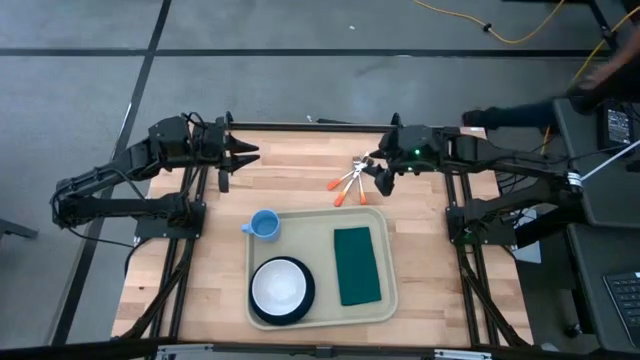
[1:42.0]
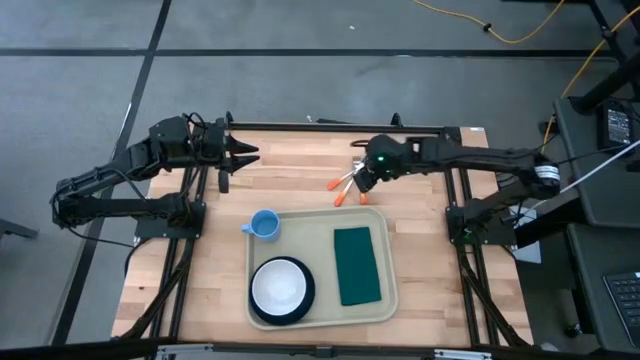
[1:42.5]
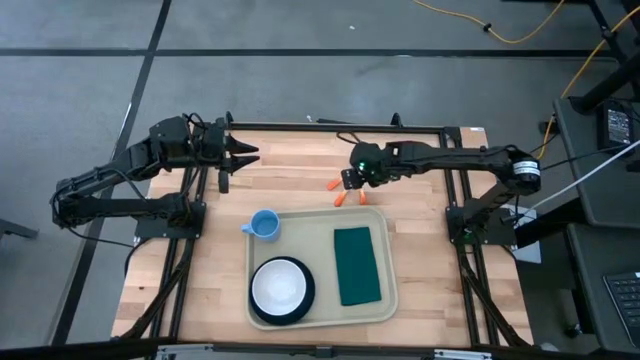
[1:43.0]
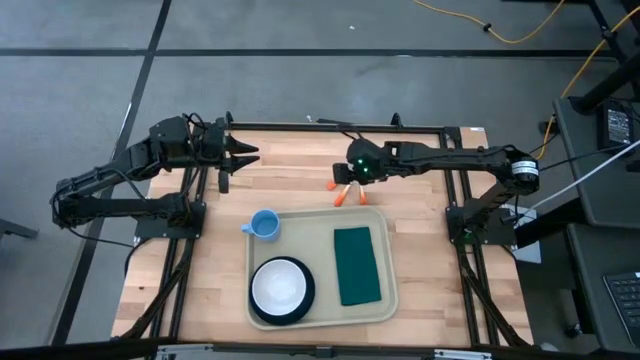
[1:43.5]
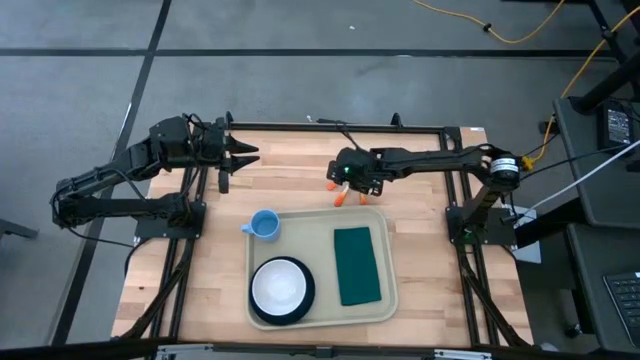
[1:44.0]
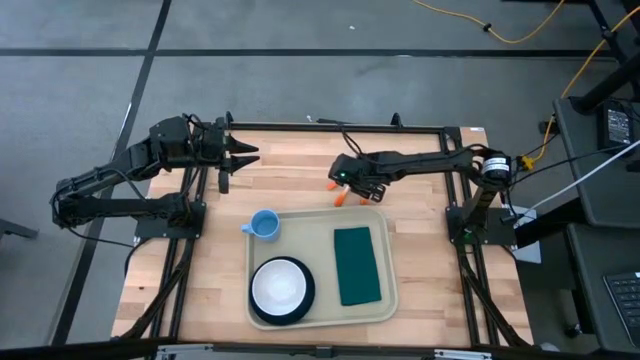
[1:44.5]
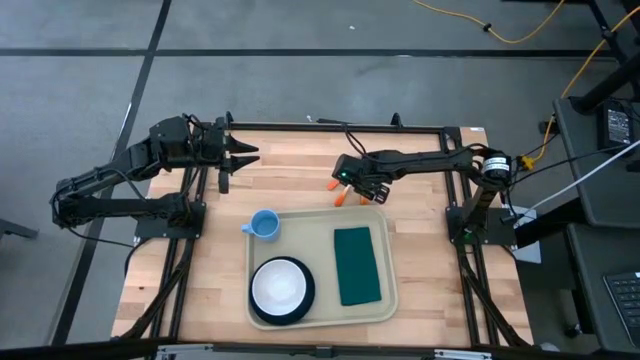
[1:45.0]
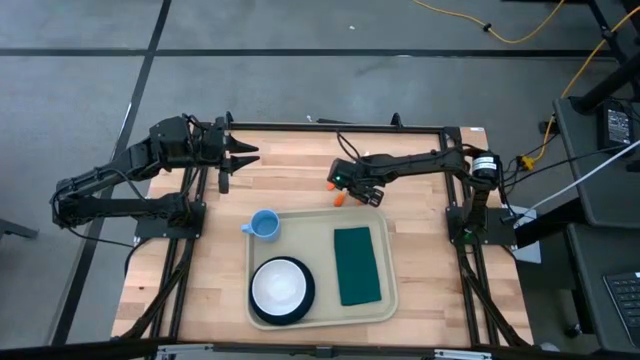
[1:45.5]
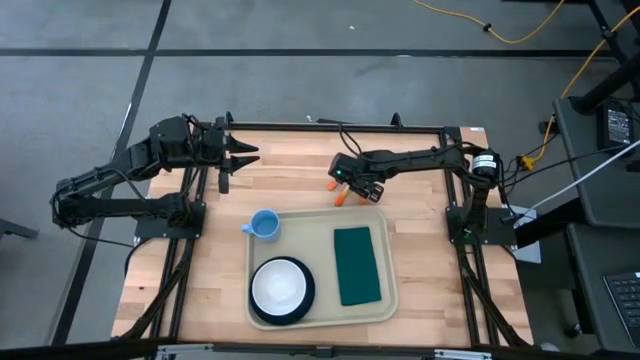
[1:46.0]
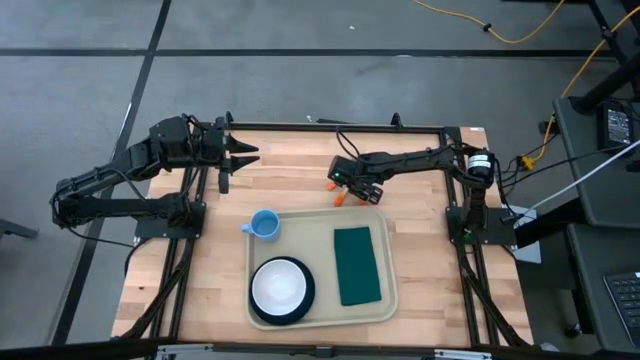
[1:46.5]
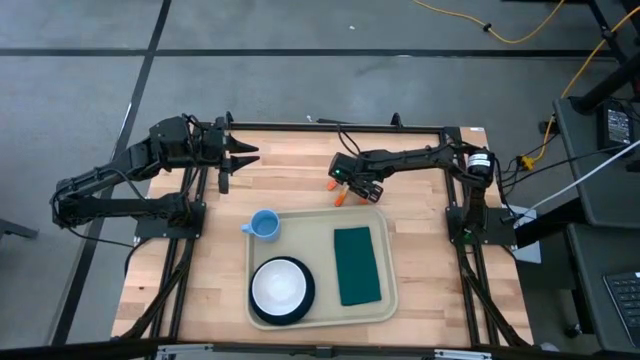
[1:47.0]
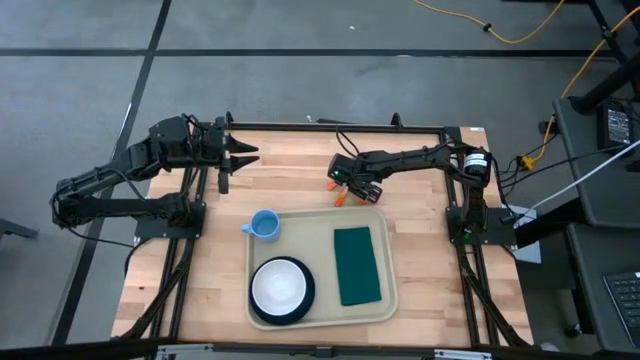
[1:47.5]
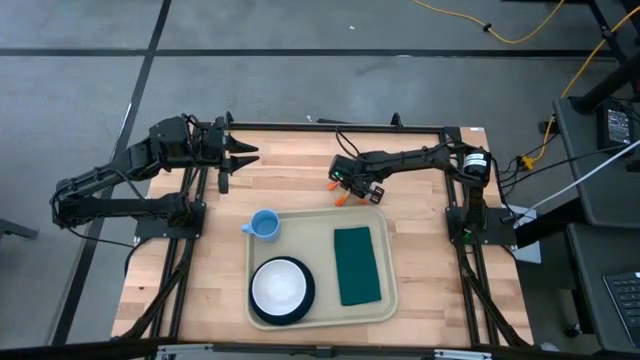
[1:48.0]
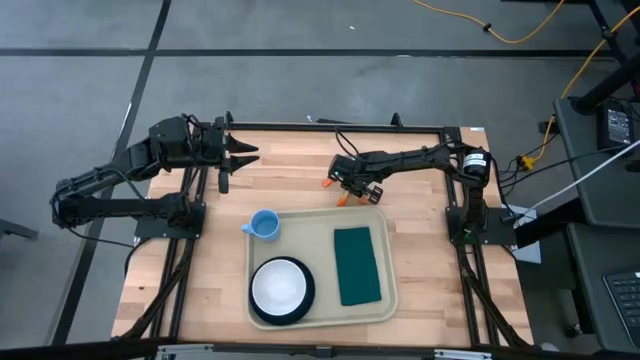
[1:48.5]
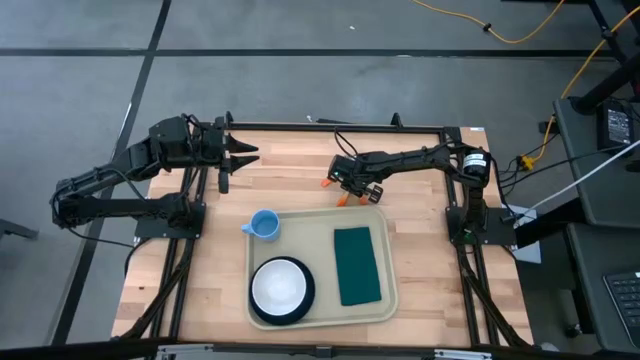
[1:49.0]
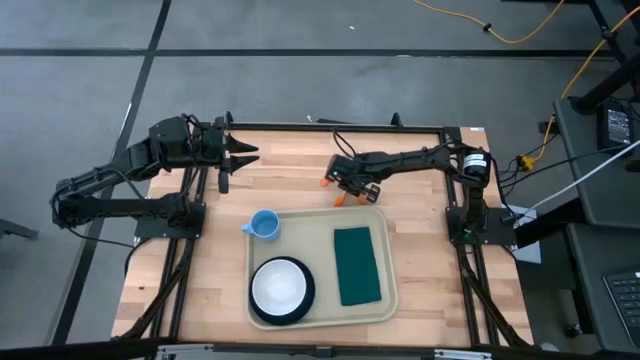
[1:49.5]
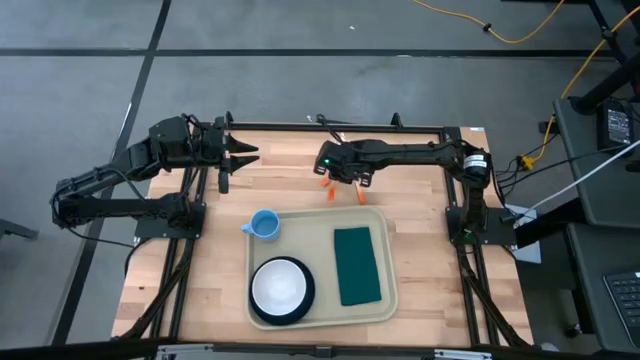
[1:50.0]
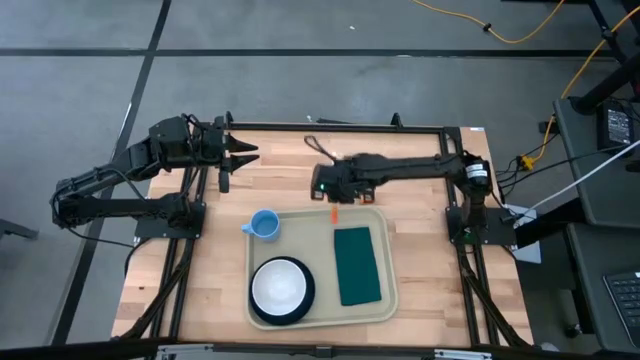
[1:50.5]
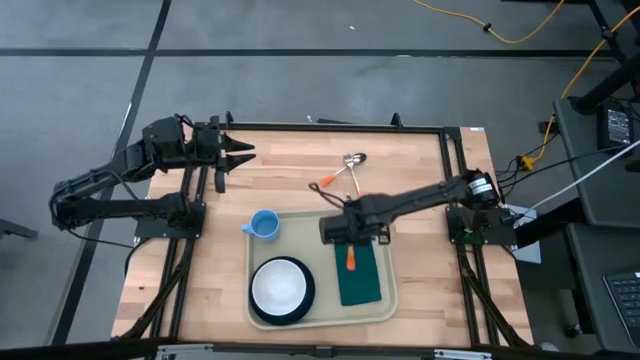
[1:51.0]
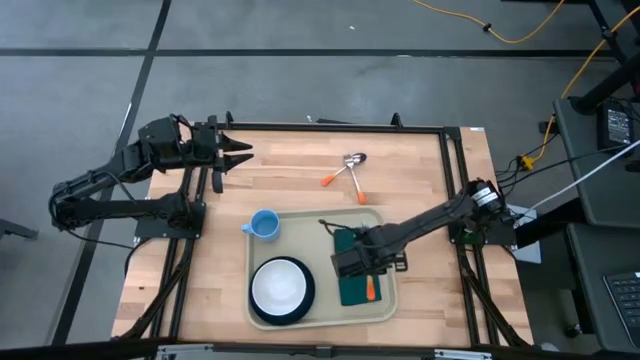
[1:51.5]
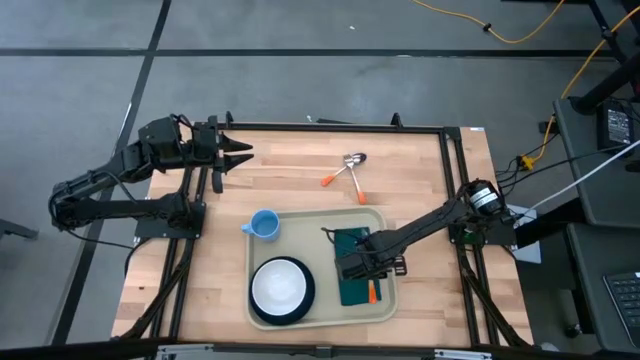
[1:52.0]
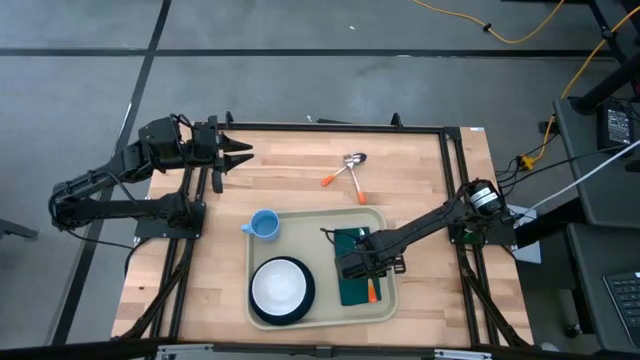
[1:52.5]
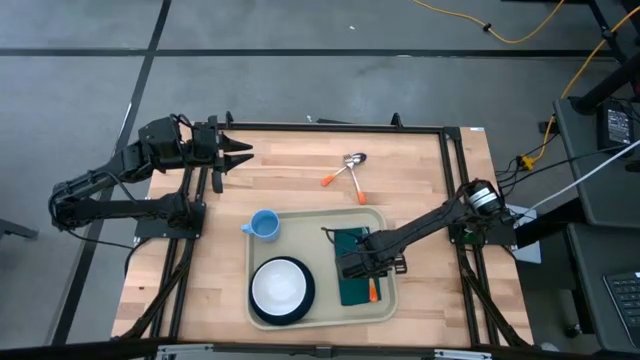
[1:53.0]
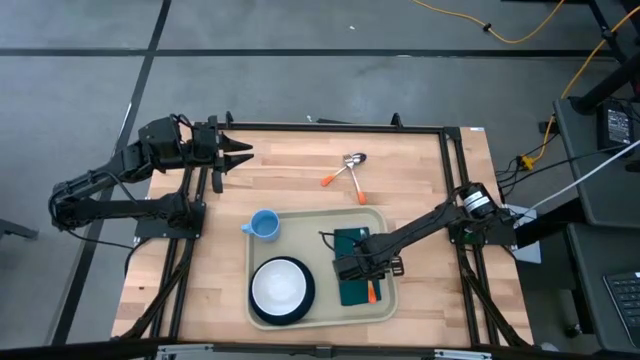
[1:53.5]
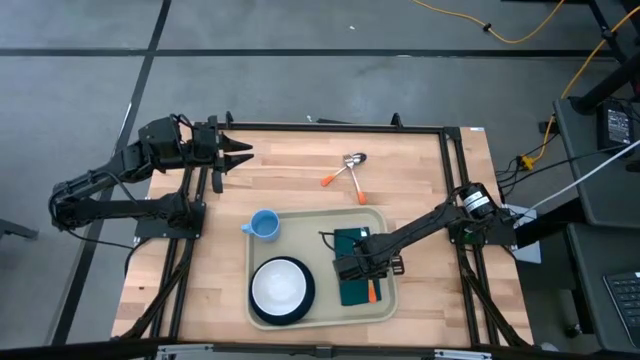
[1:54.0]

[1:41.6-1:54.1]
Task: Set up tray
Put the orange knife on top of the green napkin

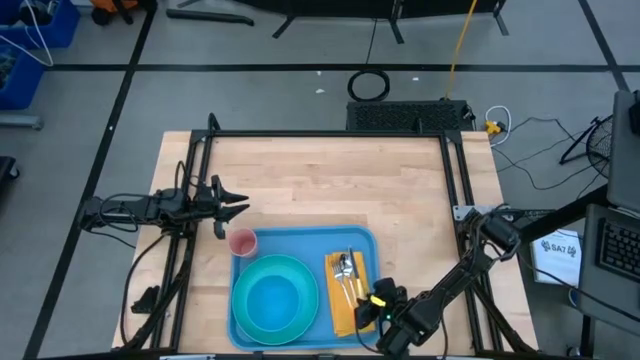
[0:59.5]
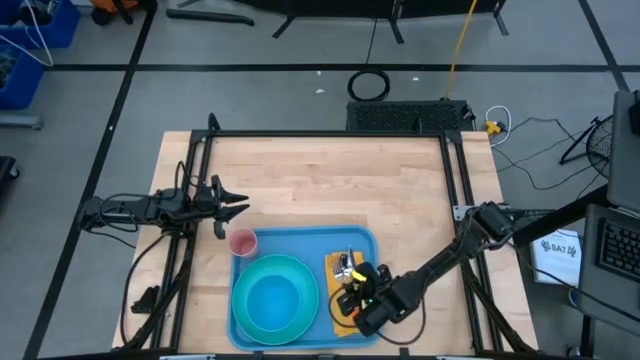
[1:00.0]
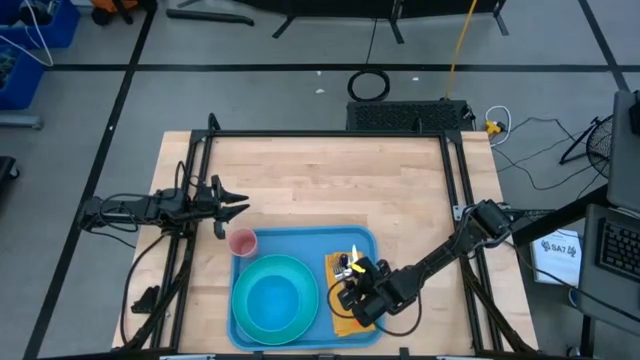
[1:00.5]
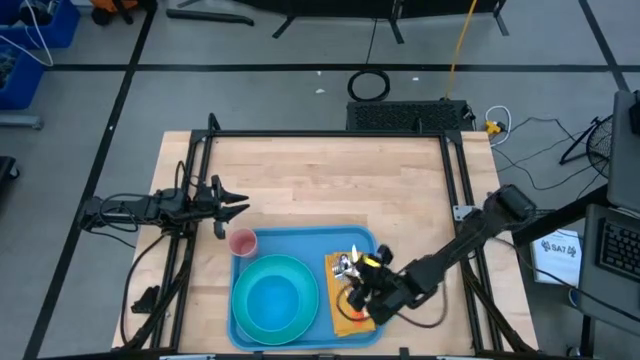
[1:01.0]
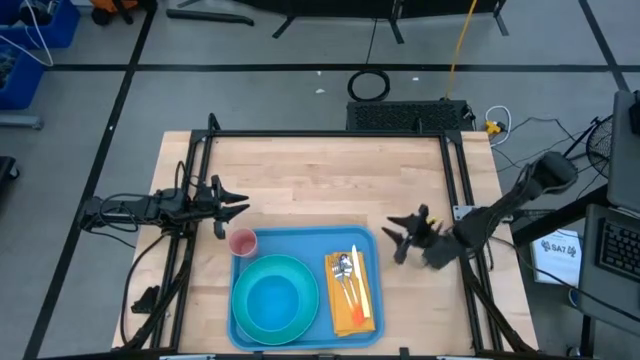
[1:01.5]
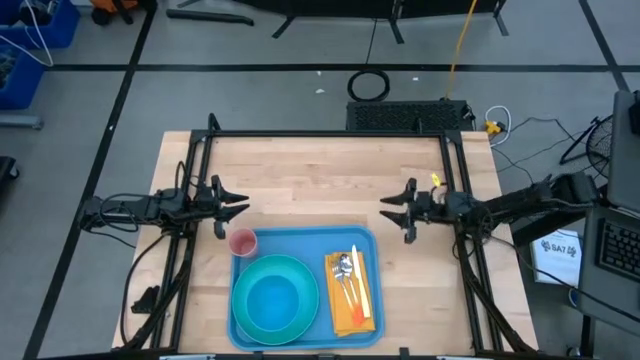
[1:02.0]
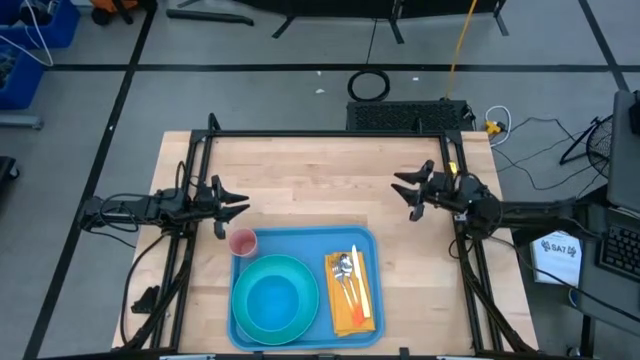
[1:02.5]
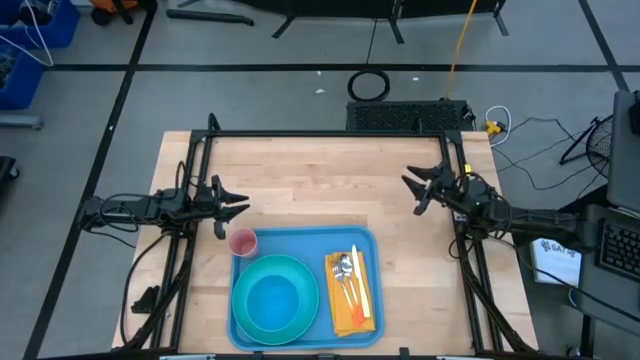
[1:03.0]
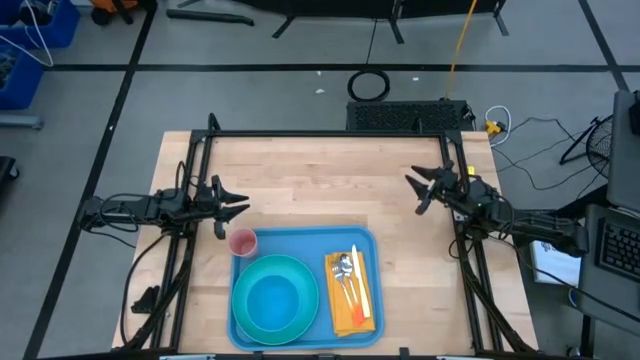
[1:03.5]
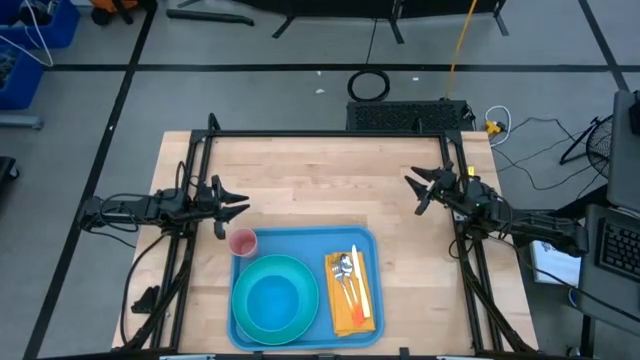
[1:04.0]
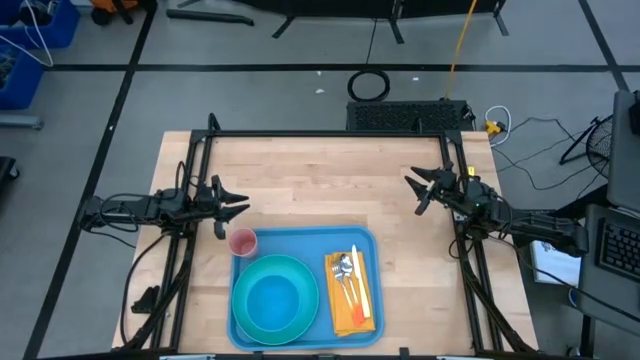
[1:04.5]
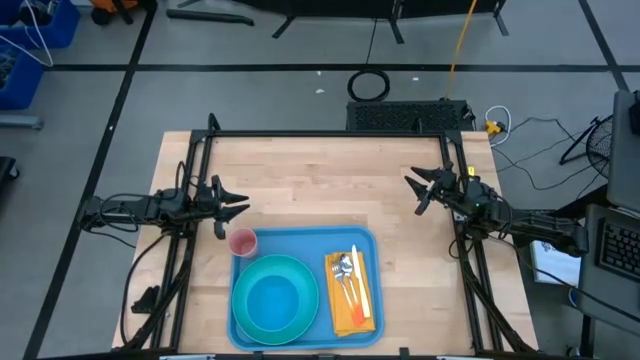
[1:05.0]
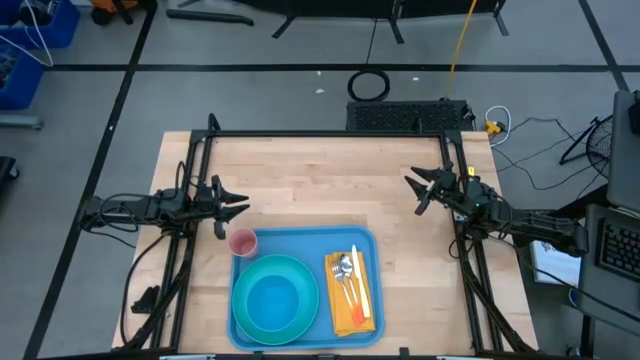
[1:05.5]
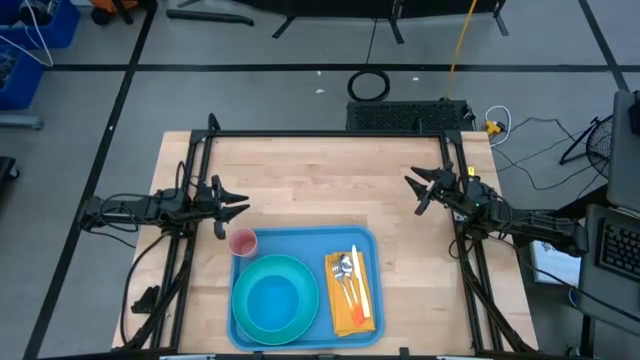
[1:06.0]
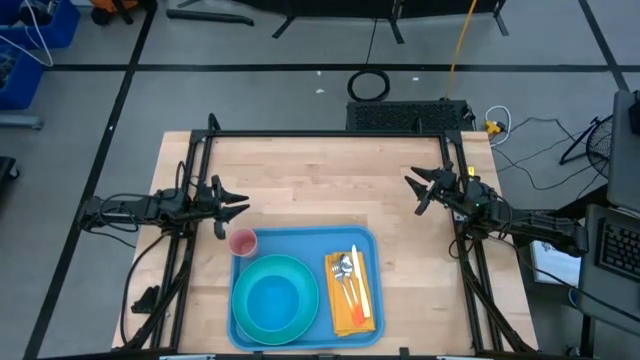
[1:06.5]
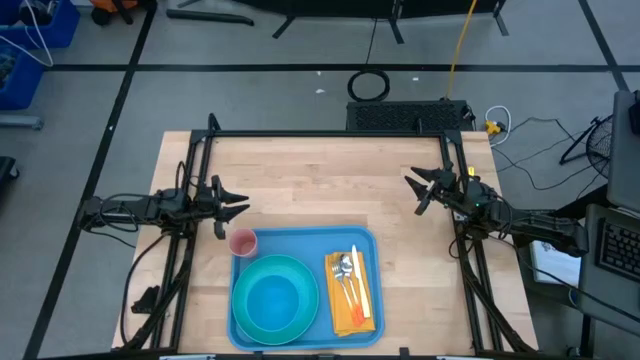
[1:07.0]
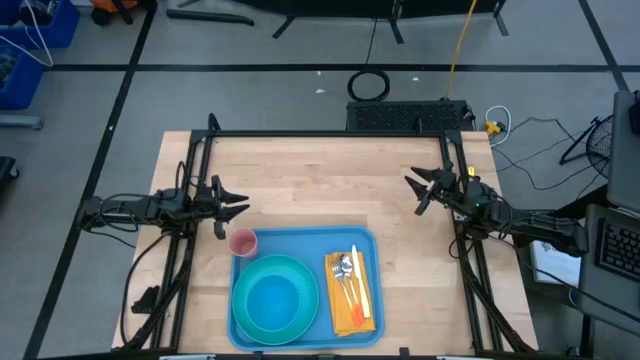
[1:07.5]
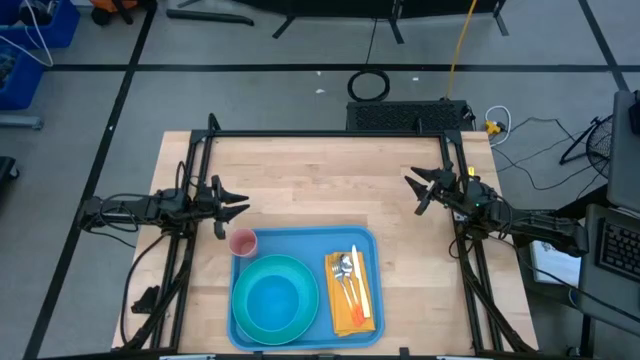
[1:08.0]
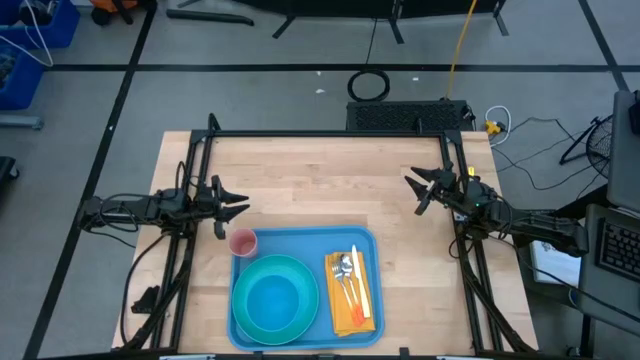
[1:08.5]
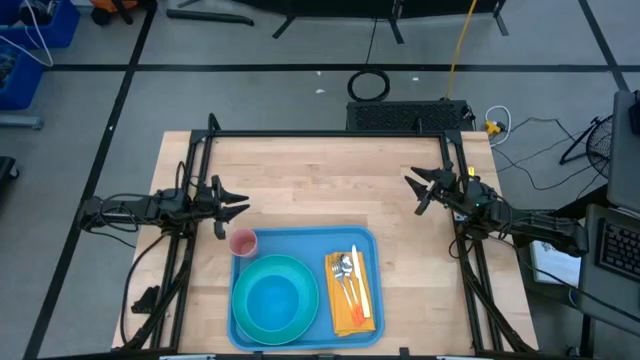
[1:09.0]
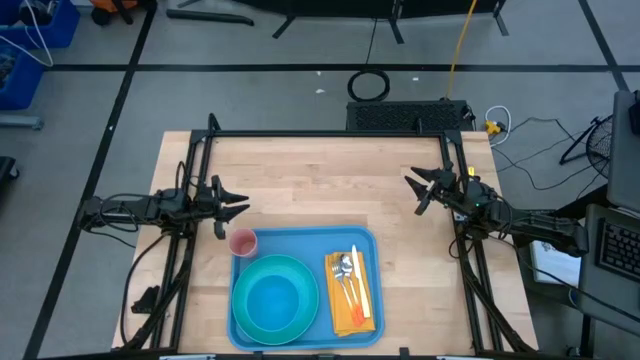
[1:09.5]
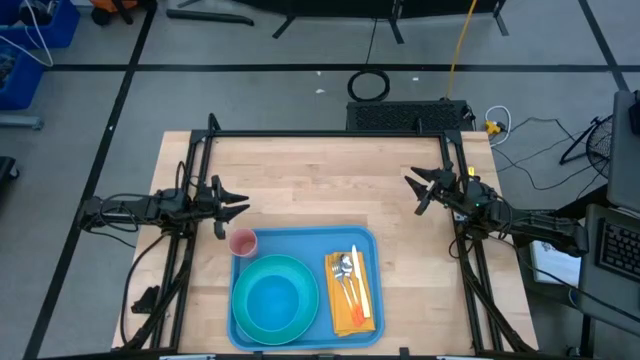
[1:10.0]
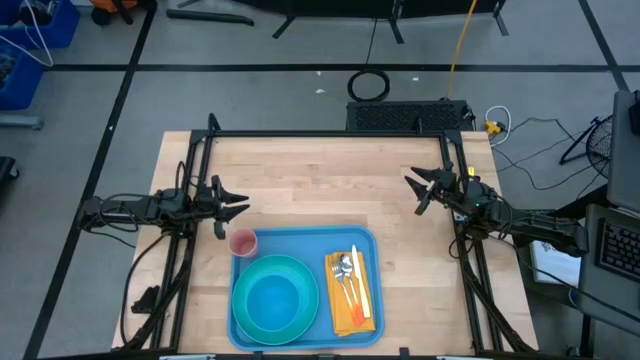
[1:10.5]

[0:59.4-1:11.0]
Task: Set up tray
Return to Home Position
